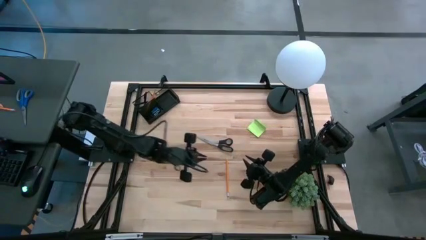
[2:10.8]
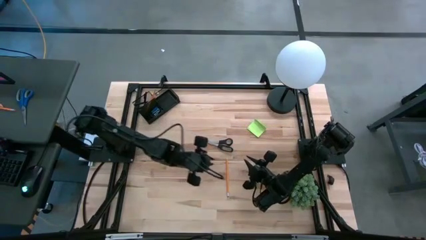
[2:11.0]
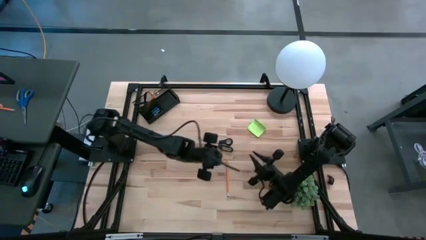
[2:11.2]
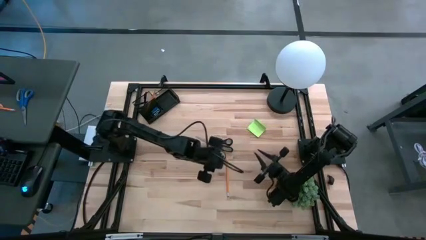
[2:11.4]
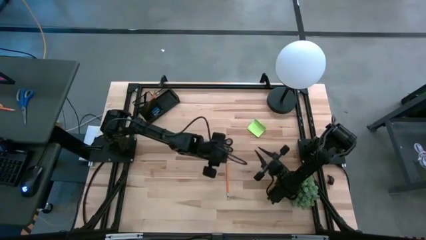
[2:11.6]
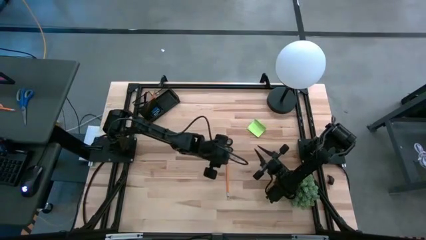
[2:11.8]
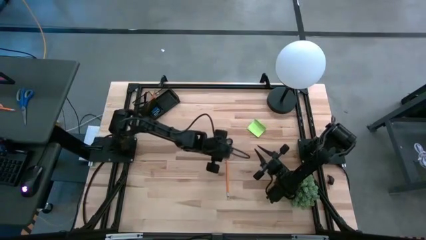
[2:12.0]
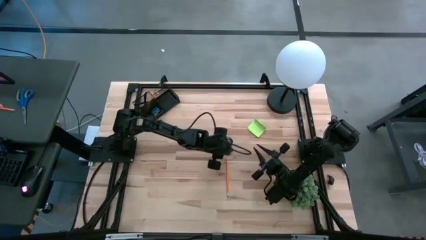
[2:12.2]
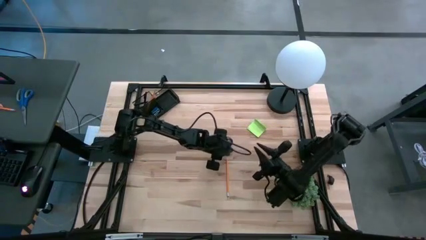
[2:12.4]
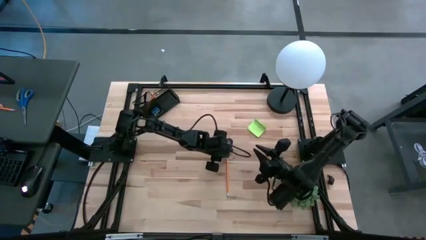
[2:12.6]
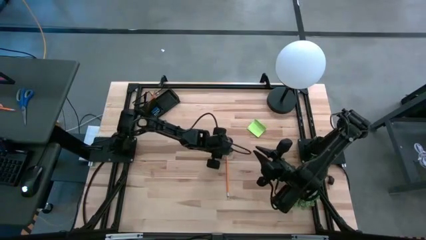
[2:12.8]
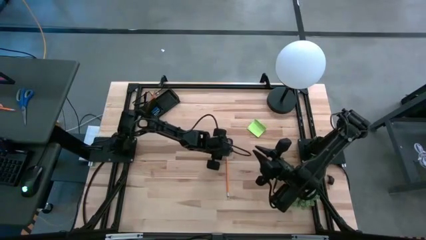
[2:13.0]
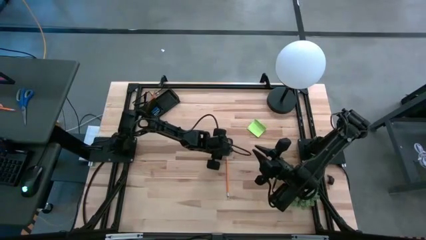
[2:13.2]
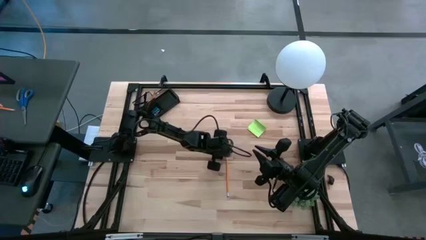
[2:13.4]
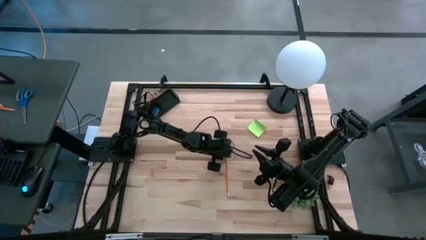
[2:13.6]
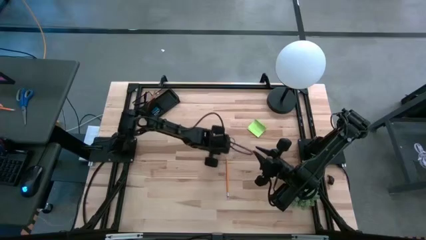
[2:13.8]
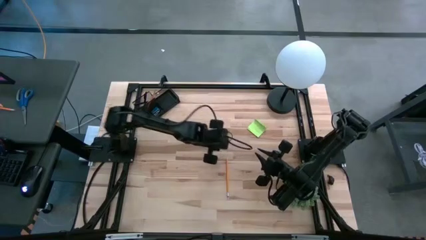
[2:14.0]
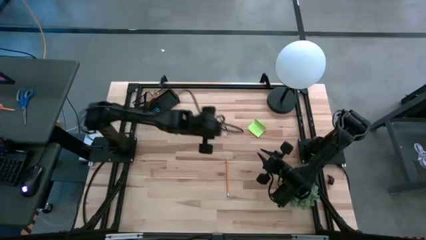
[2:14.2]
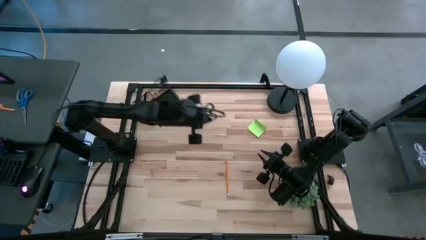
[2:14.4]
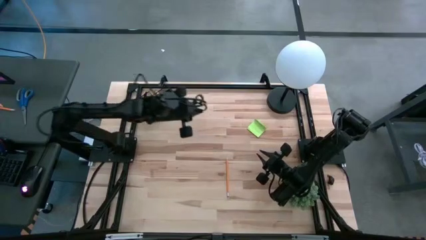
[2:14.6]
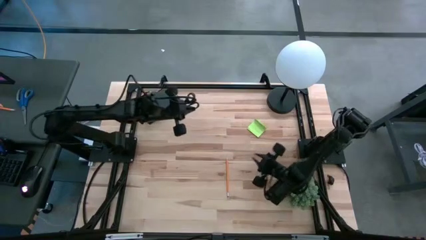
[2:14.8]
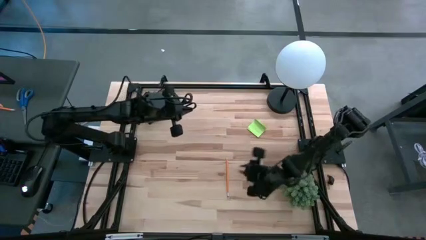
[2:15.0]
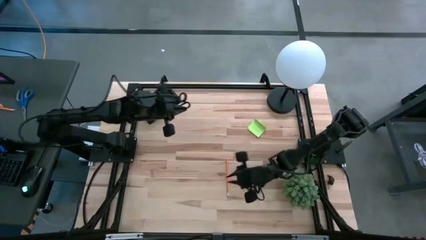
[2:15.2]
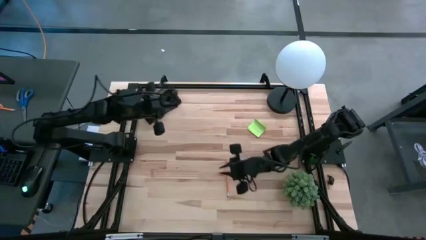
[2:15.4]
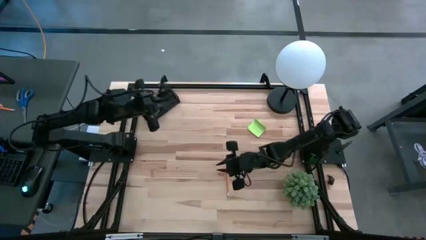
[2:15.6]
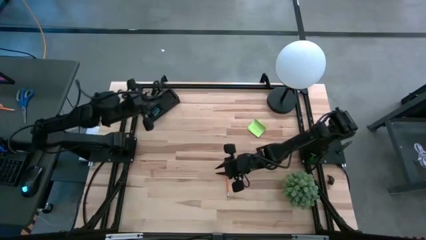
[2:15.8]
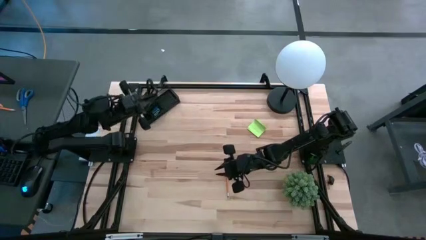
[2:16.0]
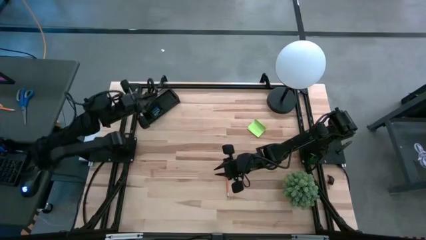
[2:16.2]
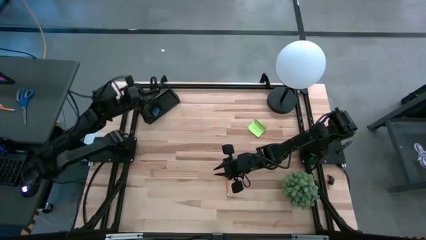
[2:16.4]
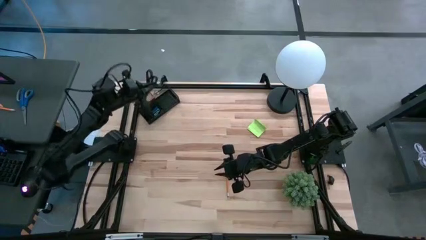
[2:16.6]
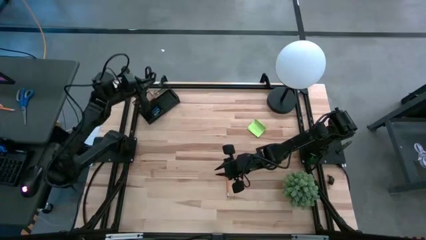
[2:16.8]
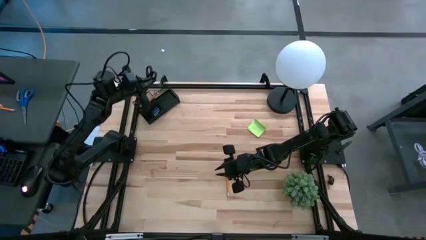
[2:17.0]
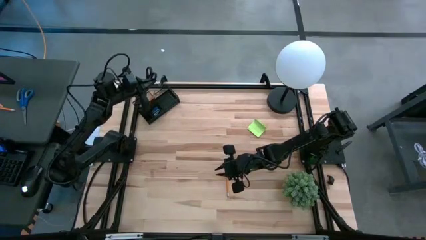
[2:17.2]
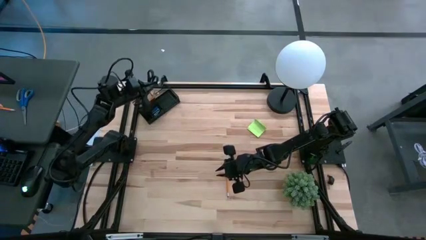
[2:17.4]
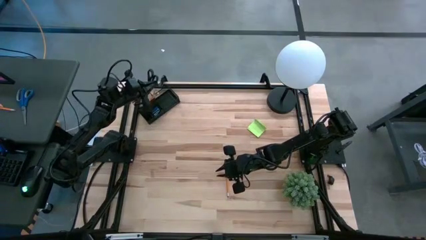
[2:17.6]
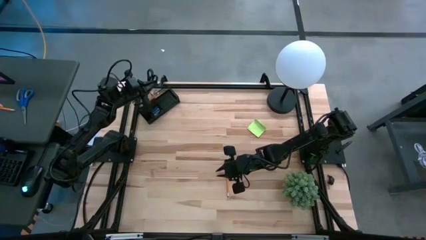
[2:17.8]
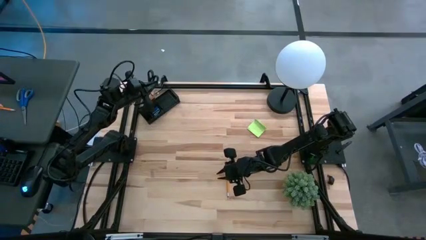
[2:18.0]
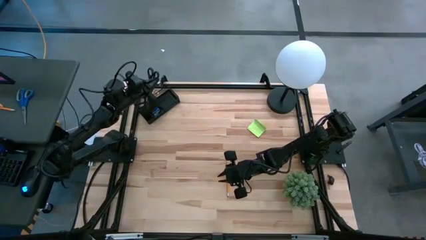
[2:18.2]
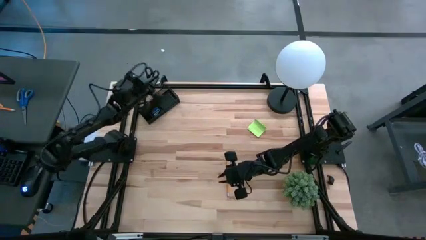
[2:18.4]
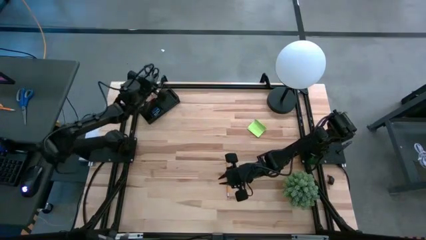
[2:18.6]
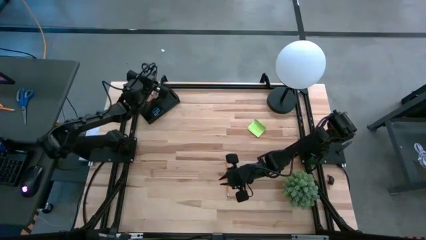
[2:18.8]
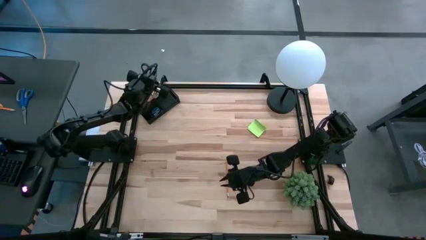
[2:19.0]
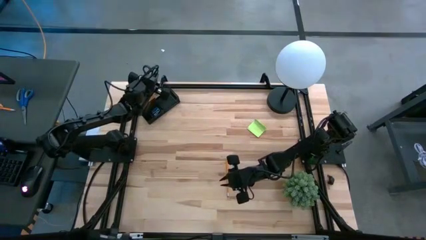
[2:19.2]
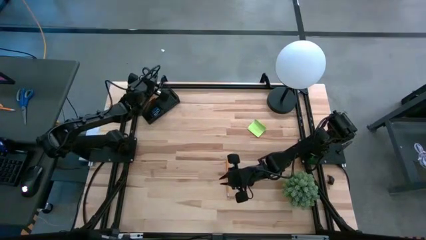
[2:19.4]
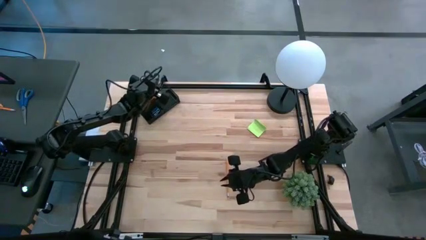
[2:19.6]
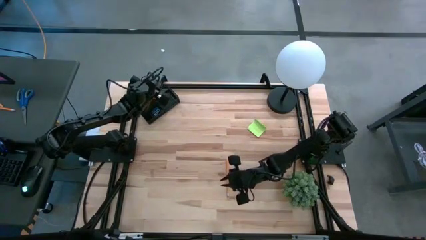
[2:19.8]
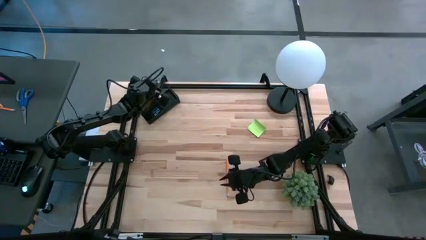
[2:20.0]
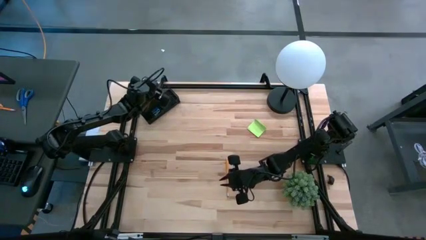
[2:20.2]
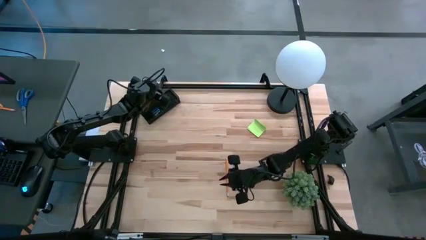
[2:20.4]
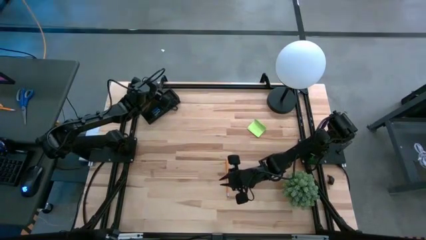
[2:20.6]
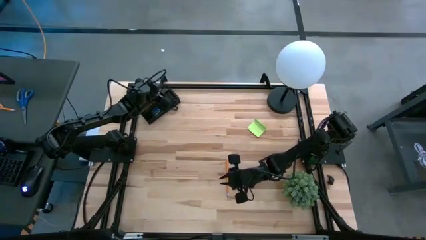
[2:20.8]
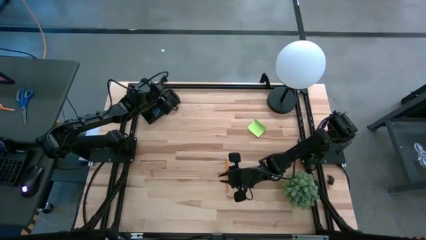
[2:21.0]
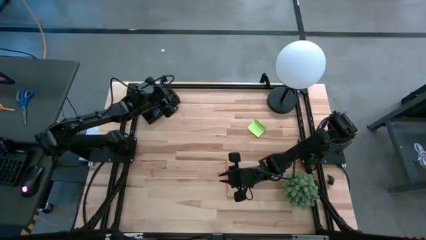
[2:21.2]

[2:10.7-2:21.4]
Task: Pick and place office supplies into organizer
Put the black scissors into the top left section of the desk organizer

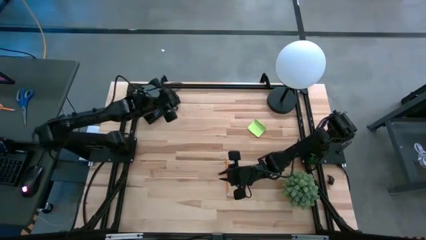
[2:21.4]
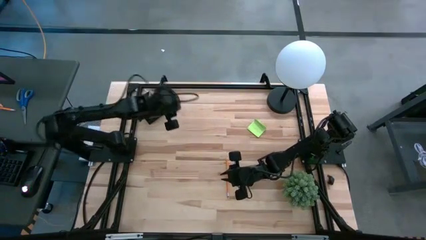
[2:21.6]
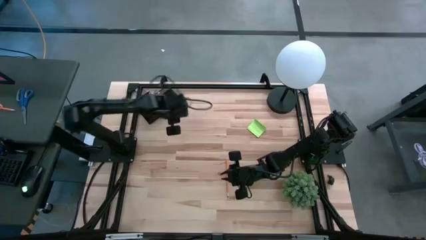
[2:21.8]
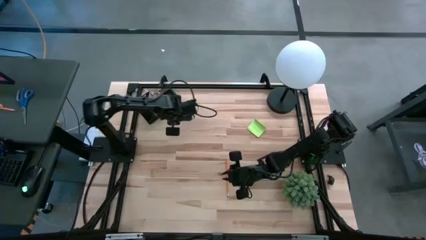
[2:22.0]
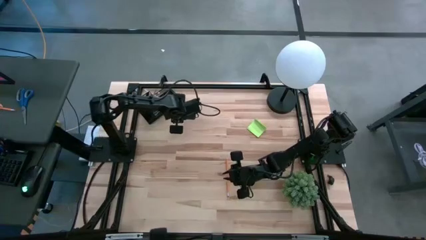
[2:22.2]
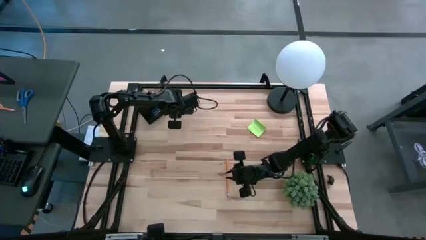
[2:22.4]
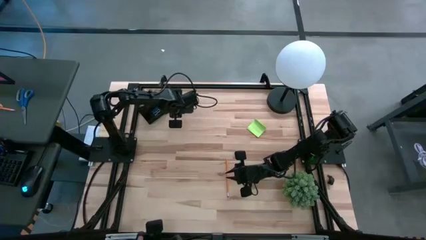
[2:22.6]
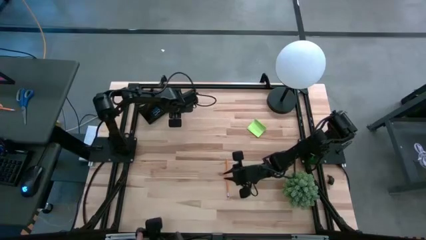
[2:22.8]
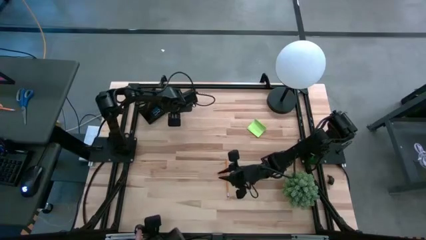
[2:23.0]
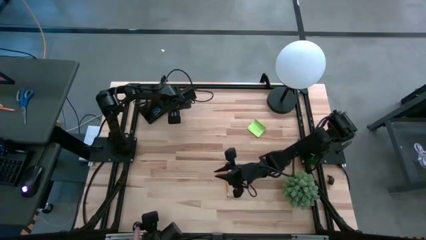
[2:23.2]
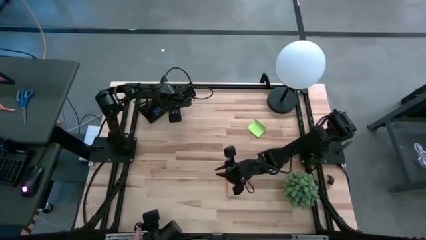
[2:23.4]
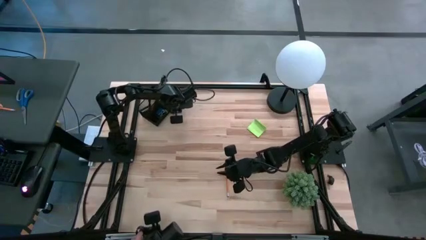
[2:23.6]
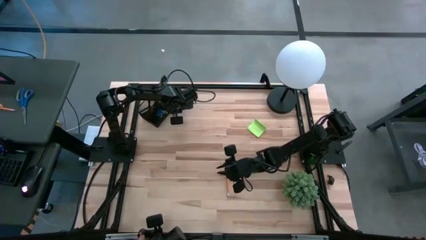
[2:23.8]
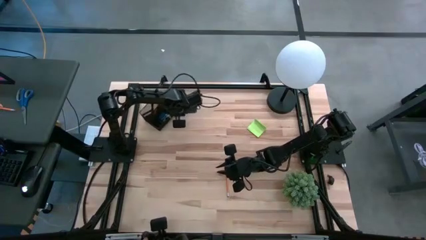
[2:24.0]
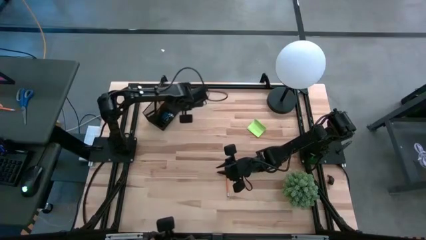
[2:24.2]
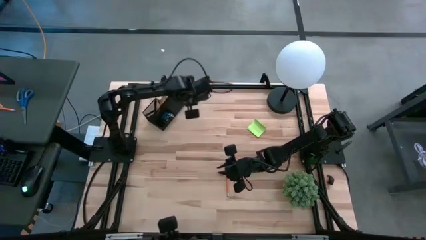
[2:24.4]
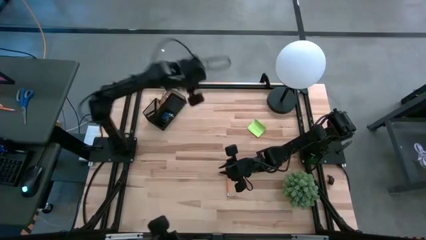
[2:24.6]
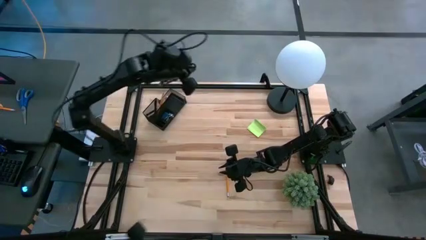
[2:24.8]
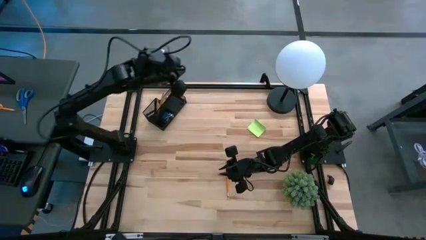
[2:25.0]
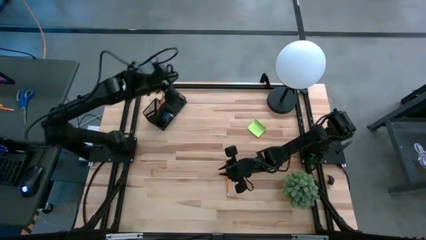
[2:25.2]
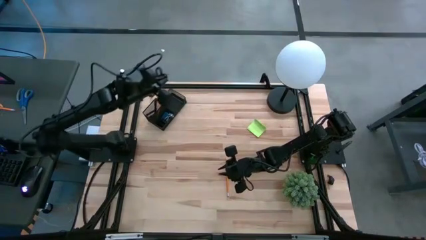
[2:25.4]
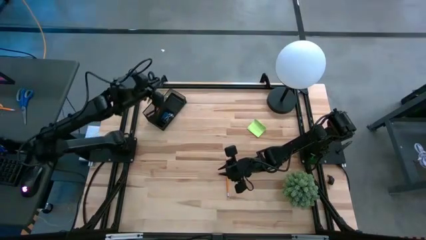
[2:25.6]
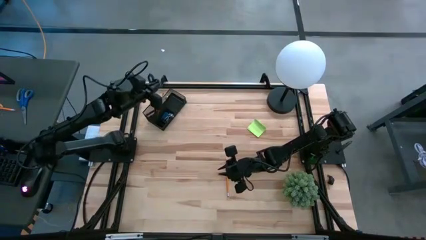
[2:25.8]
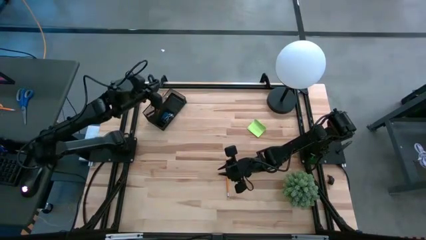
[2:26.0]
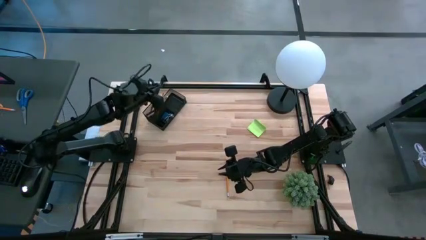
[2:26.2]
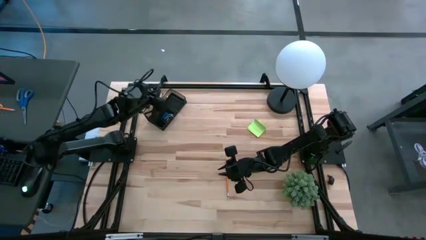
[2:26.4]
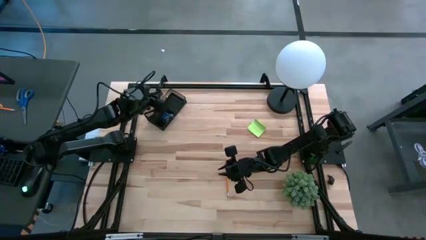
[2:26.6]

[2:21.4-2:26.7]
Put the black scissors into the top left section of the desk organizer
